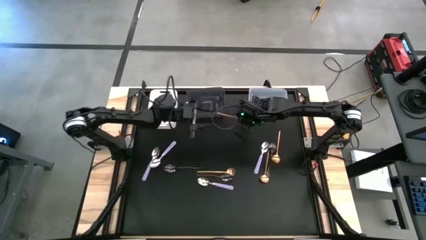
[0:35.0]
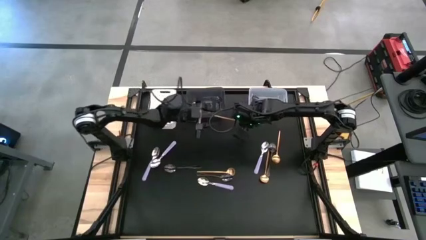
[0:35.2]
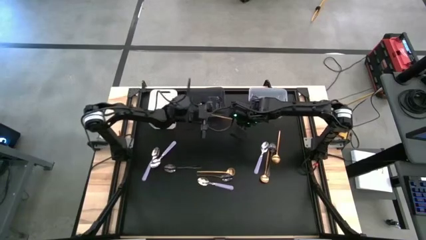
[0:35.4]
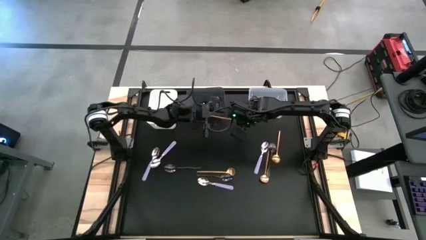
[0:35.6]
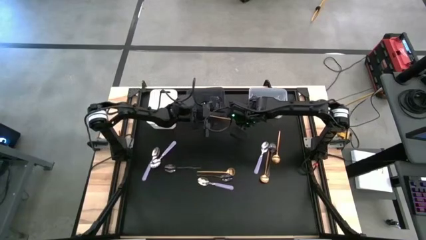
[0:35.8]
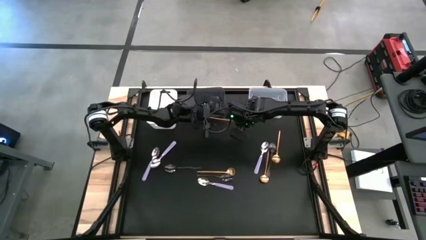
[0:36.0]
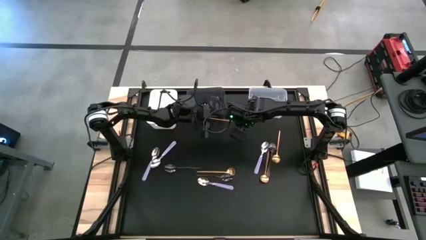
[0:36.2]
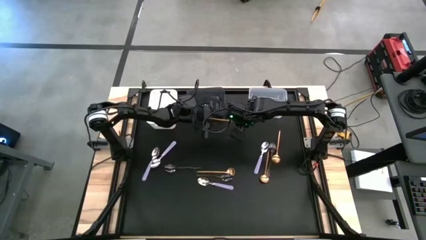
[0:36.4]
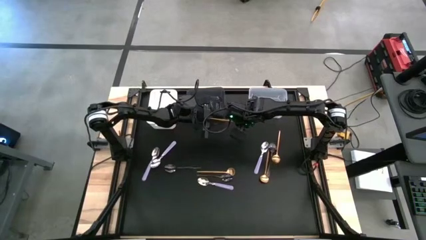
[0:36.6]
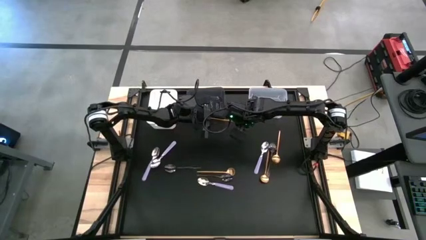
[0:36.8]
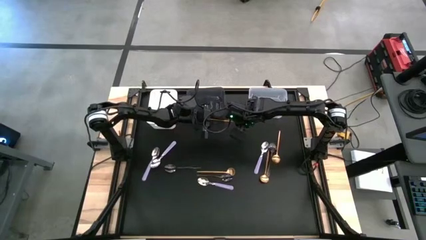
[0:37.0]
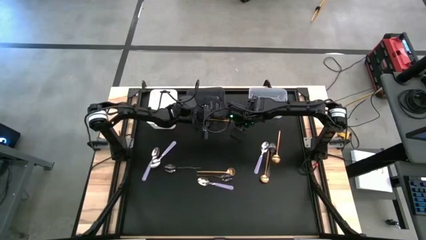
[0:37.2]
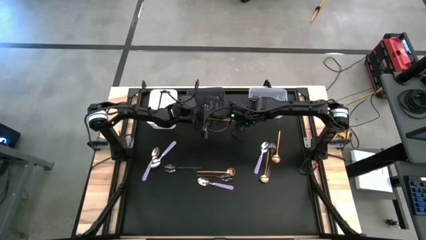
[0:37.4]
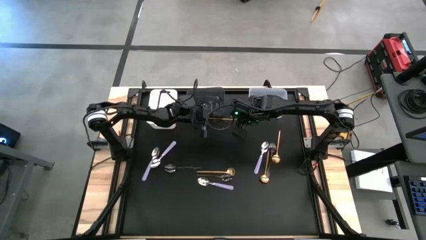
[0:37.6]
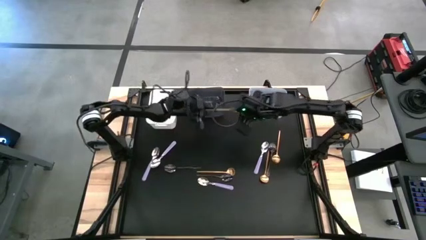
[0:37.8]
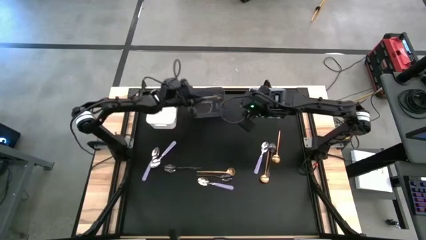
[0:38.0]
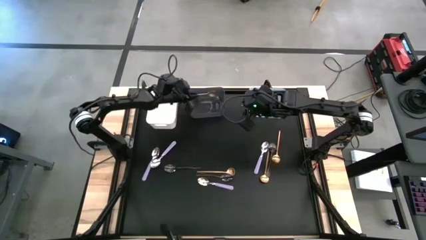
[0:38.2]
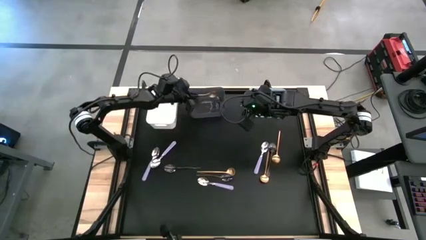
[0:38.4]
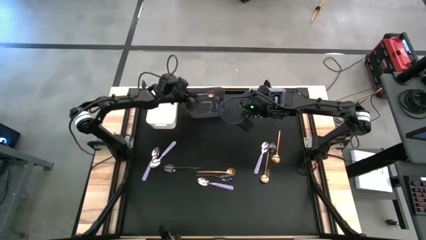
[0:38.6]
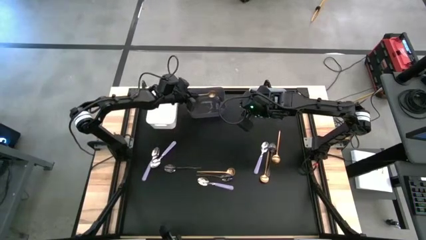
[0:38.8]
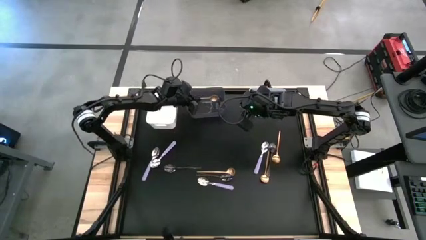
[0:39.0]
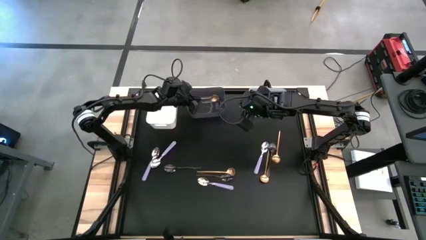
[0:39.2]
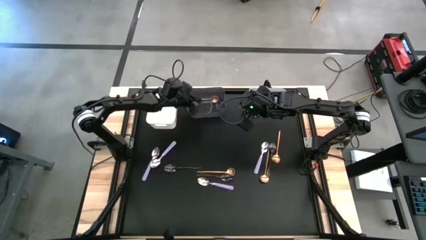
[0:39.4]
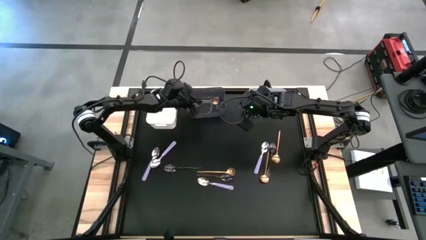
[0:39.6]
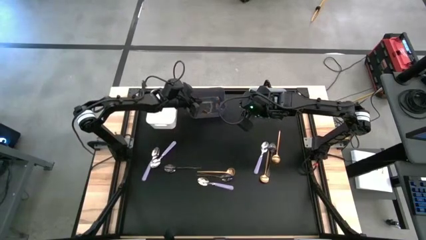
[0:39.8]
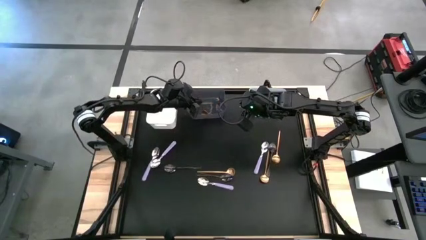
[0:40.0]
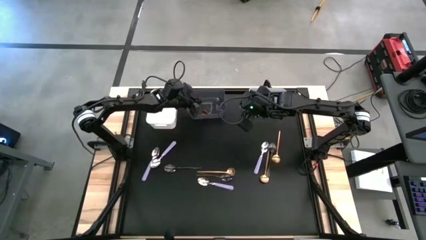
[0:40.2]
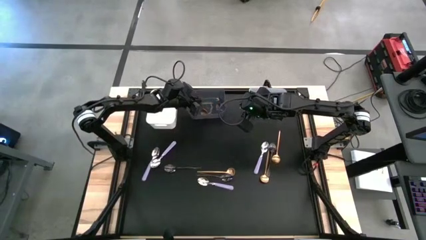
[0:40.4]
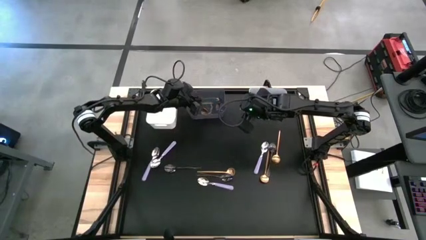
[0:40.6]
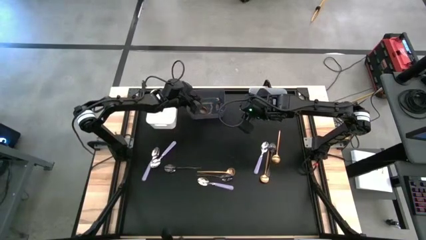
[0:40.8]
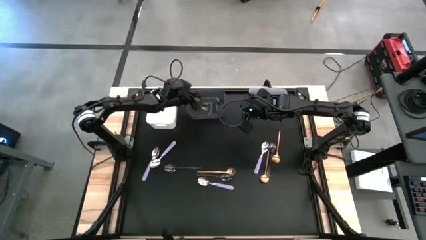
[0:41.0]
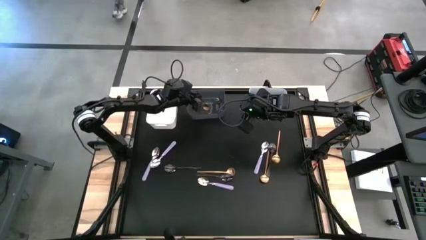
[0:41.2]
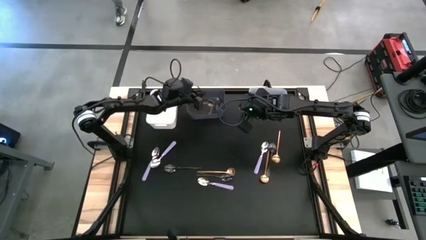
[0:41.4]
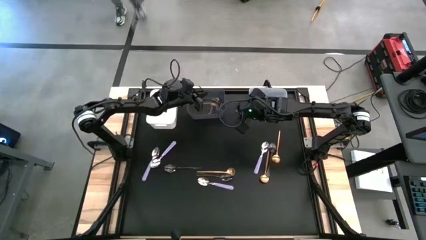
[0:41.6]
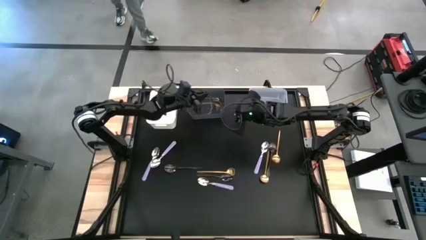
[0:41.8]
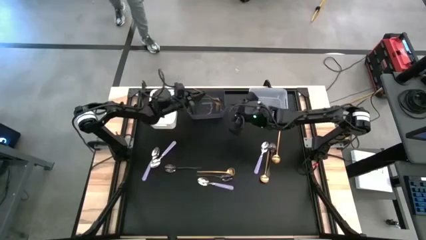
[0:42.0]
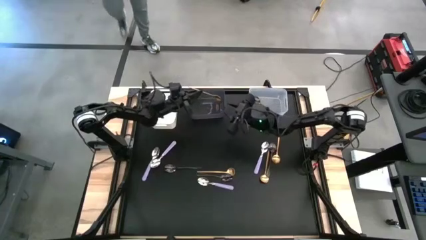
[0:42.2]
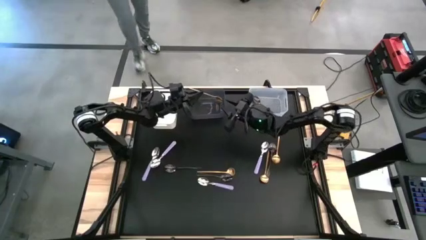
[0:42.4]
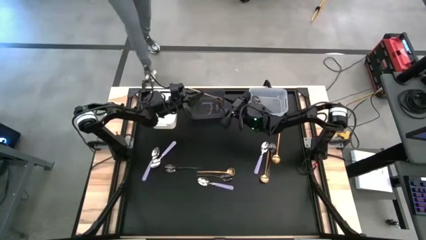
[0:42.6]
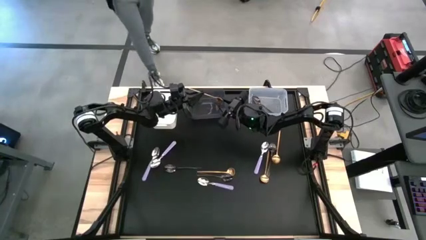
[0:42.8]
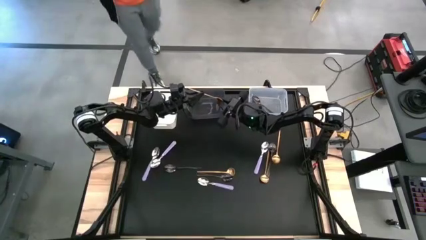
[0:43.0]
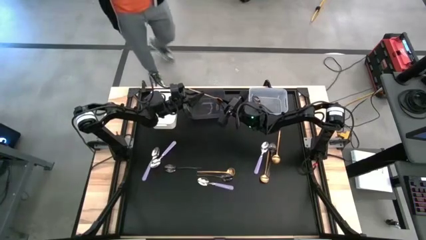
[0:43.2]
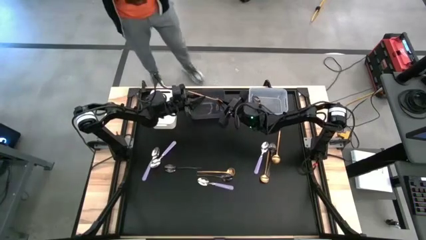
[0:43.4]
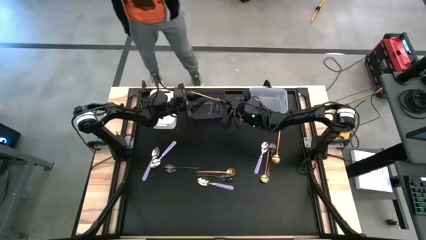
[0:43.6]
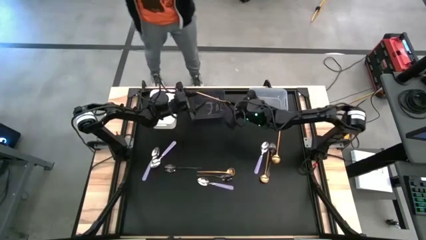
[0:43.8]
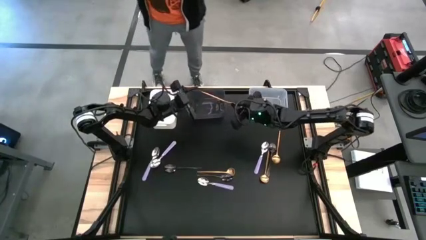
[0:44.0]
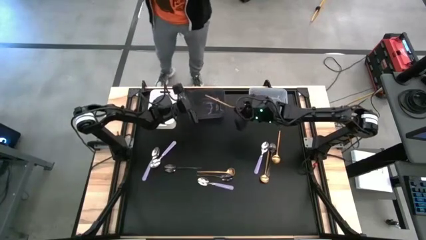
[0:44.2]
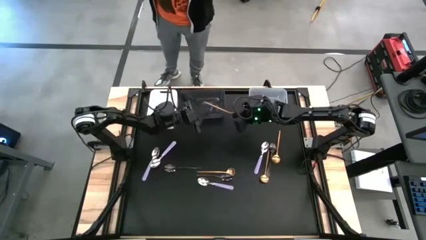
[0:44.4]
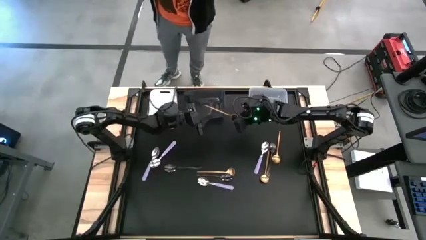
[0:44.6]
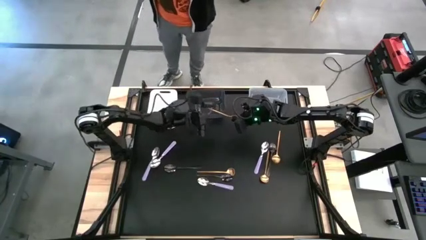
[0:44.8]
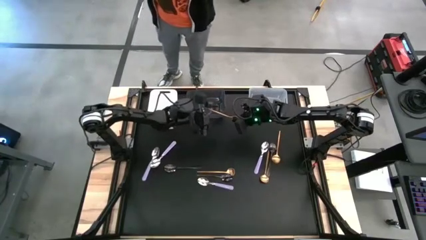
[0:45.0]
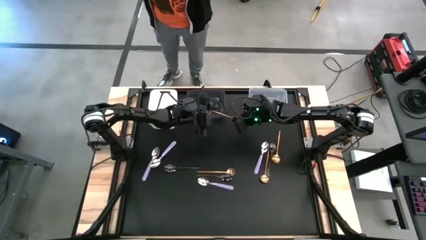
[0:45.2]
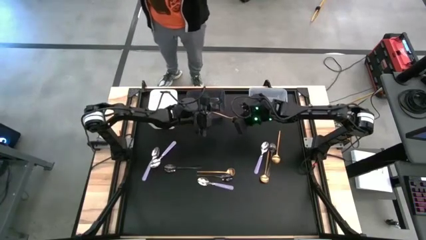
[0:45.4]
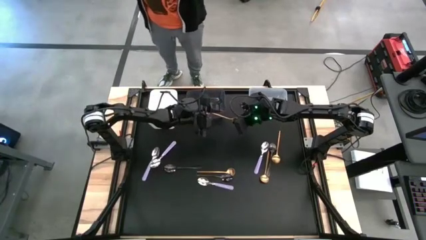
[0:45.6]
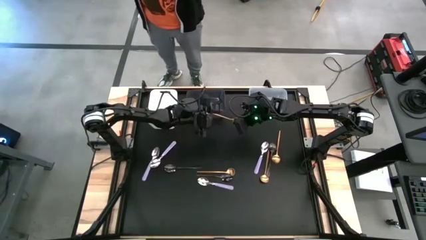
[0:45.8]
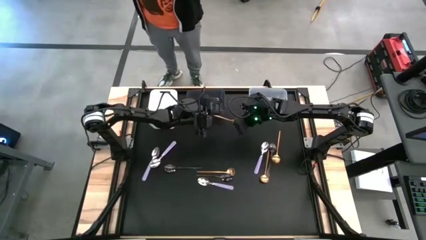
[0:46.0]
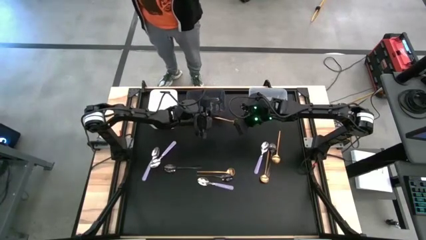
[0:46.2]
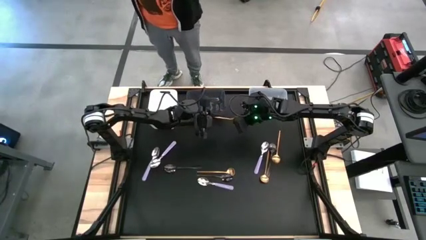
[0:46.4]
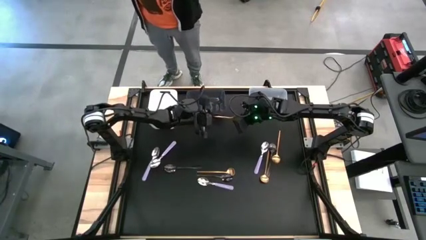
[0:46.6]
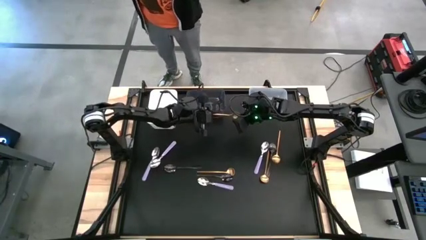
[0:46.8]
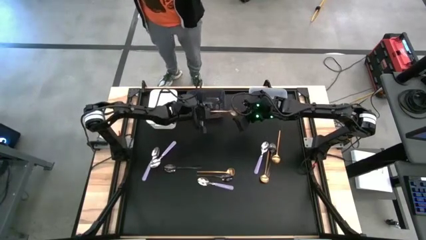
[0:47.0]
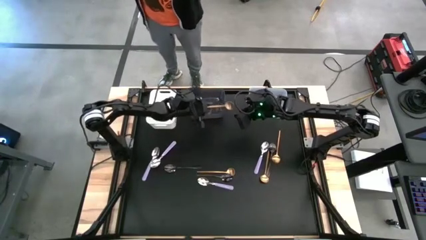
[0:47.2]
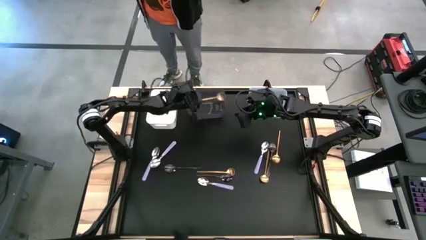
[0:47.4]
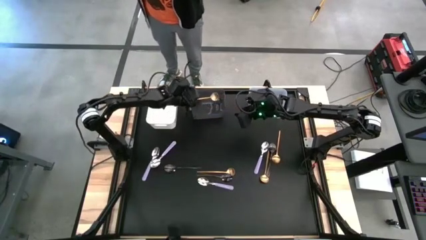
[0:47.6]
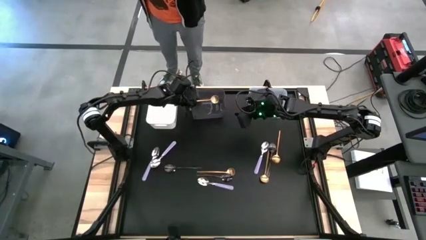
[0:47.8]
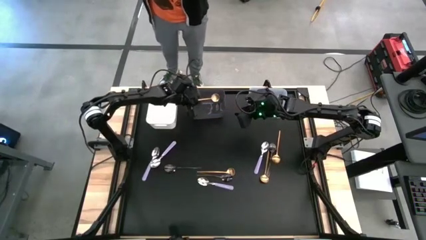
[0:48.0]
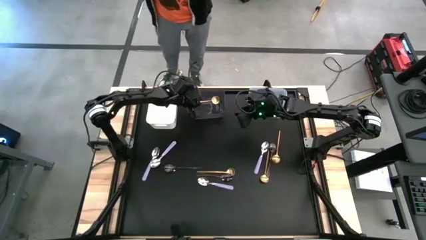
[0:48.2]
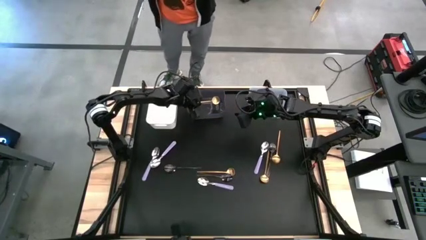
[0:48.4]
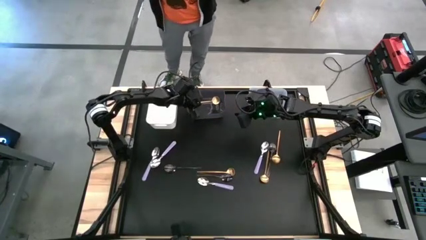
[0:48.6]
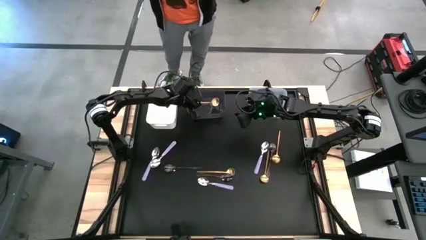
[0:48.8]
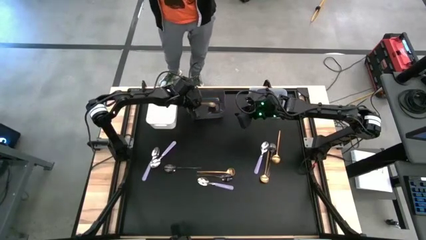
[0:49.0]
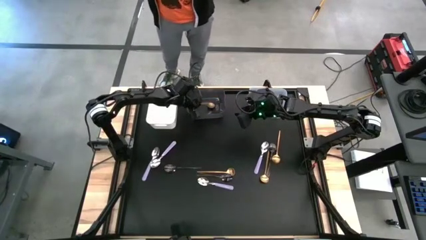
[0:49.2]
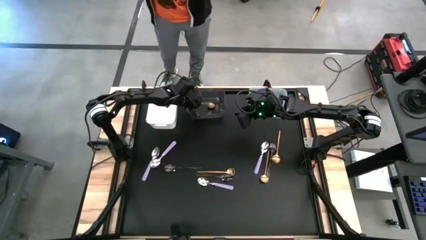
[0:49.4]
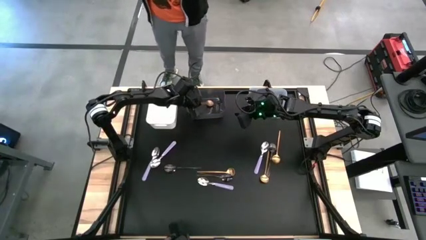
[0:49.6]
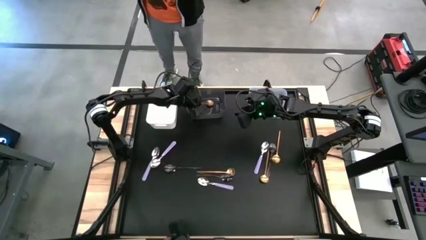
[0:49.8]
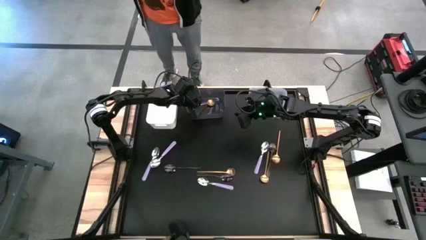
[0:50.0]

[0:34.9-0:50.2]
Task: Sort silverware by color (type)
Put the gold spoon into the black bin
